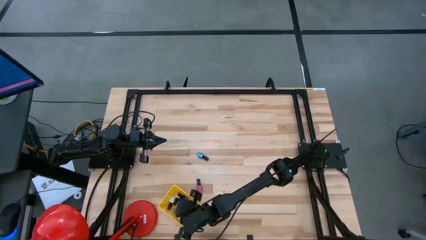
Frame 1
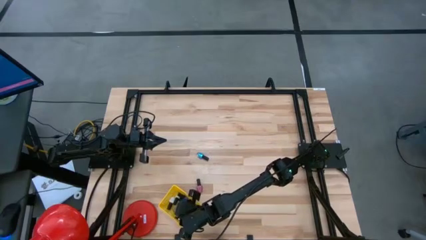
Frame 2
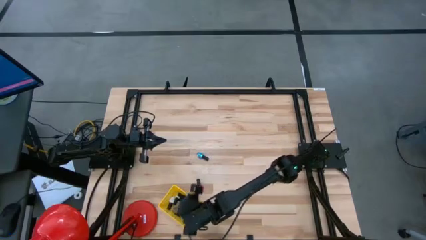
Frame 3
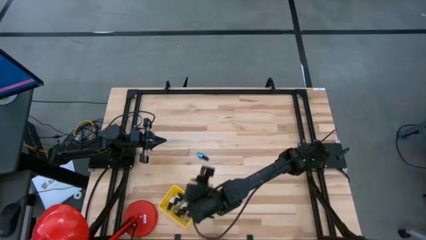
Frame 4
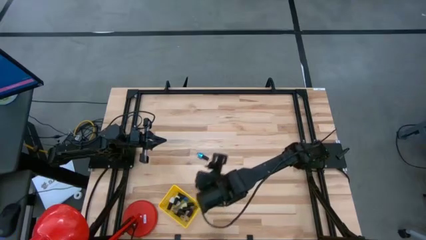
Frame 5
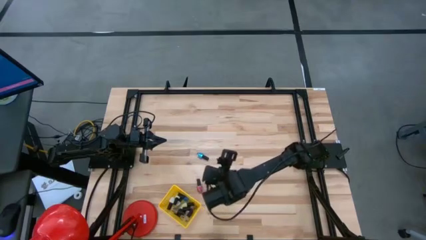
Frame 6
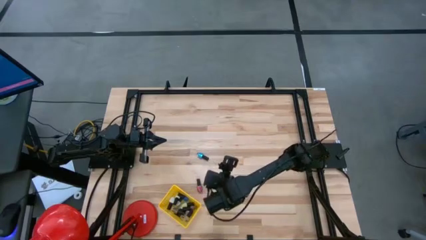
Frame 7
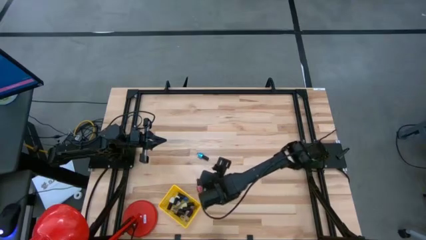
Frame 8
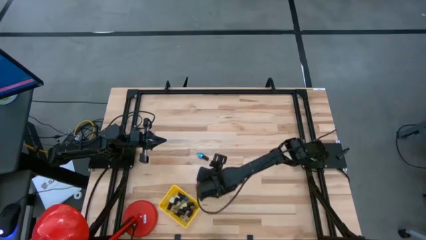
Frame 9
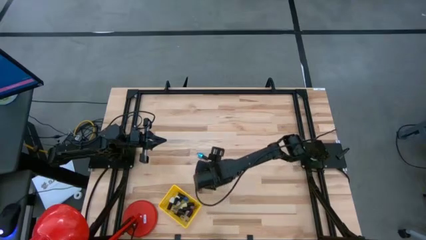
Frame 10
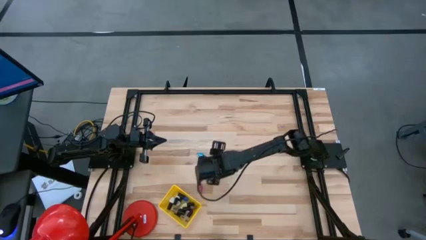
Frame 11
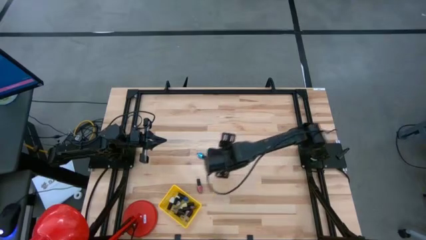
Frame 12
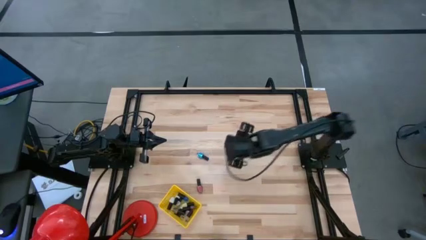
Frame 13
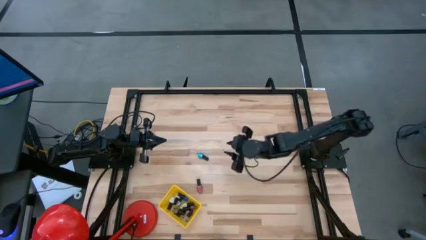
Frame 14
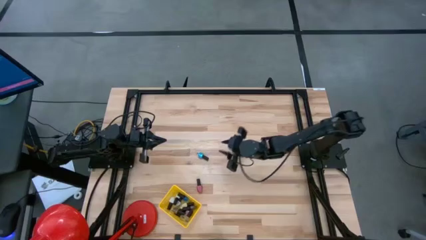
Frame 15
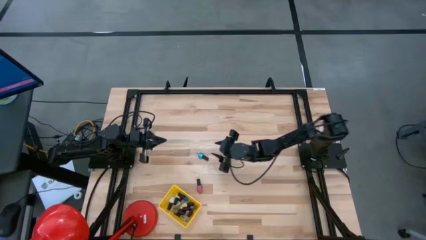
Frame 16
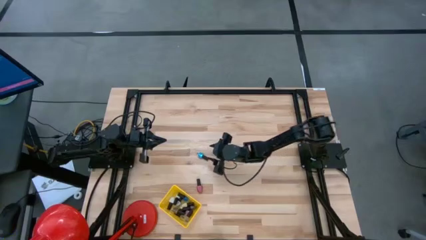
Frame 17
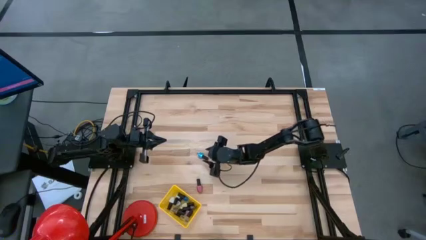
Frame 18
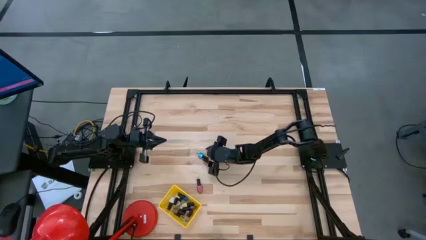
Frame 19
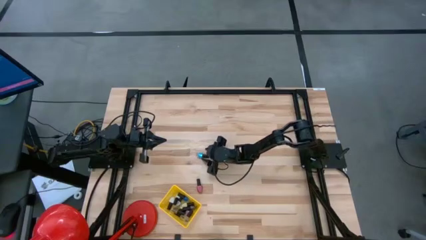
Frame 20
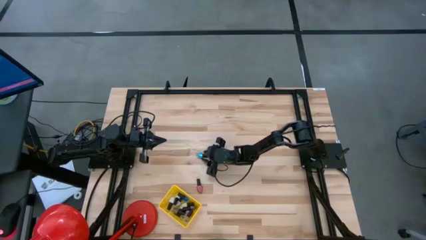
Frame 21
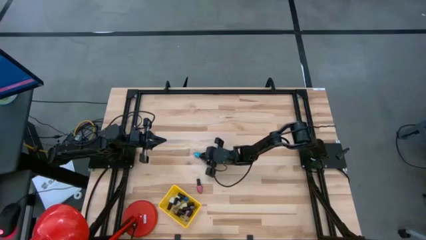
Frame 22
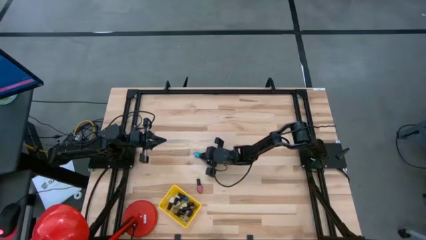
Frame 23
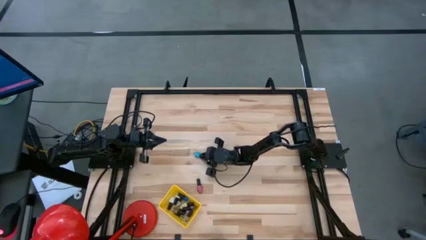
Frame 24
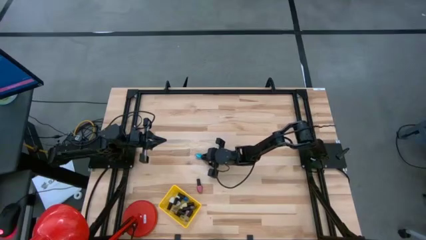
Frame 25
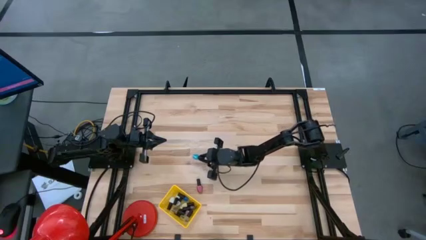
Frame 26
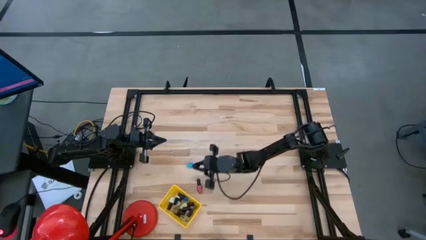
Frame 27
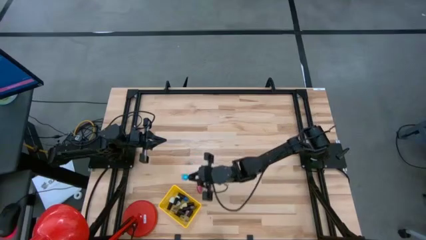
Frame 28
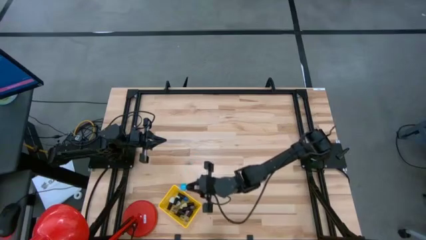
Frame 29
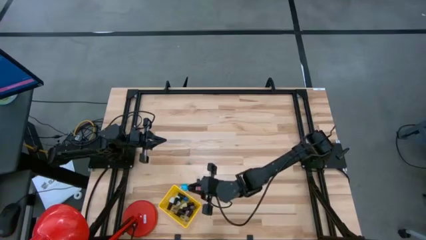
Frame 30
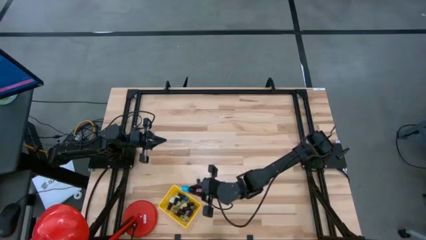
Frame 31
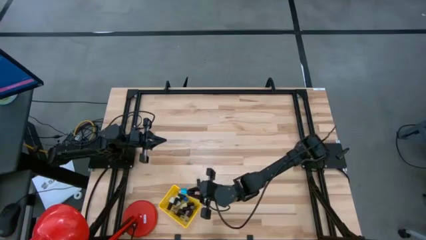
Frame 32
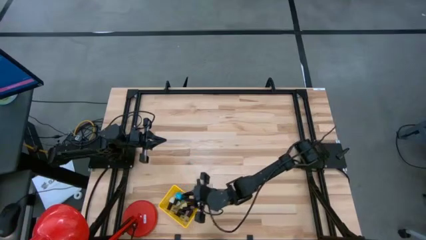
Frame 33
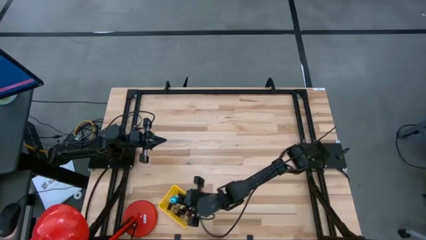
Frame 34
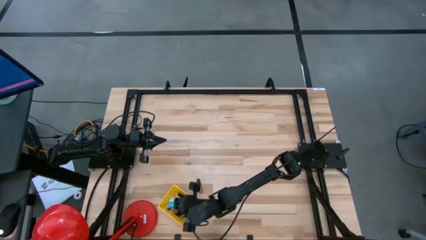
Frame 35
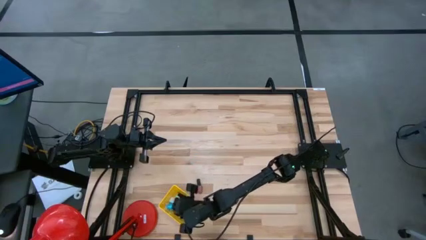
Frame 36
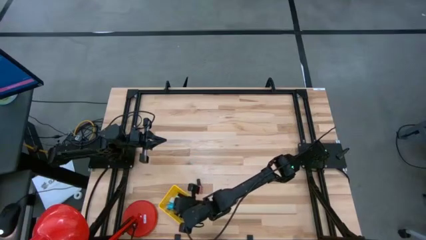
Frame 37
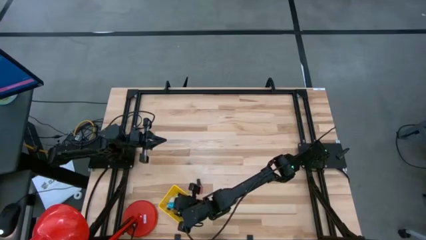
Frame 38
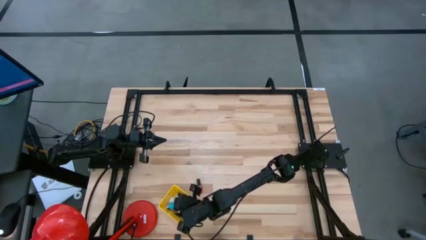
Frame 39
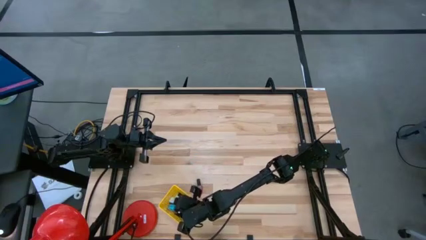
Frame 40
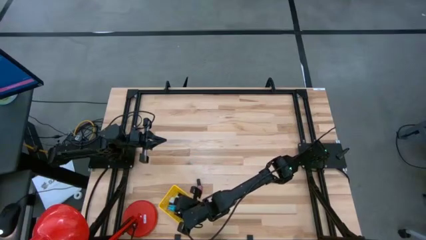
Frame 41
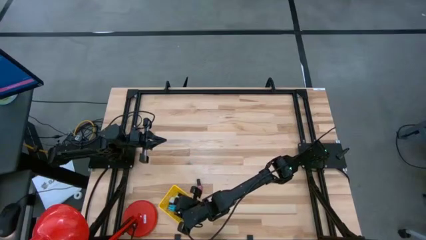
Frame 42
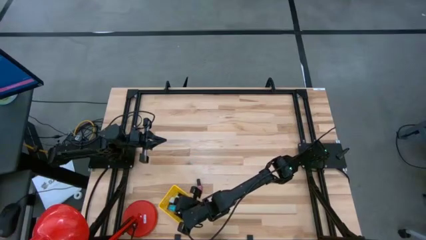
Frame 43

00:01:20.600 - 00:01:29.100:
Task: Pick & Place Nail Polish
Put the light blue nail polish into the yellow basket

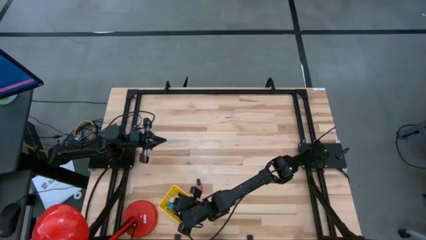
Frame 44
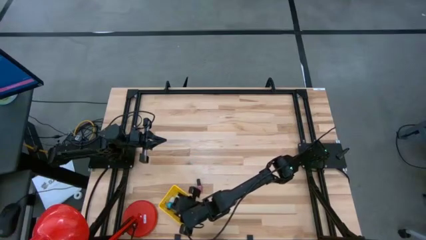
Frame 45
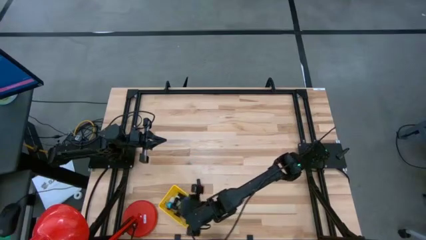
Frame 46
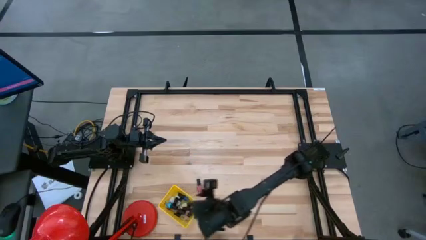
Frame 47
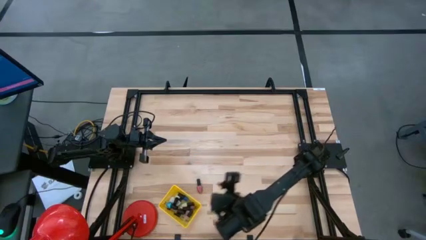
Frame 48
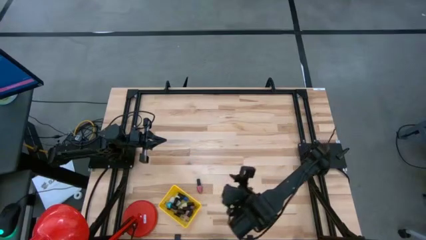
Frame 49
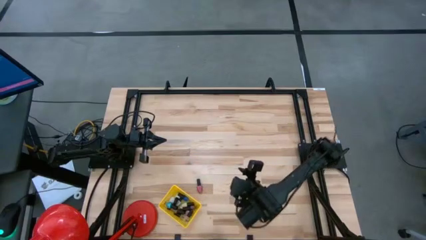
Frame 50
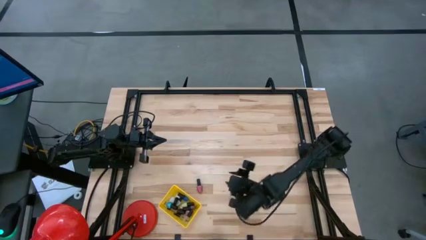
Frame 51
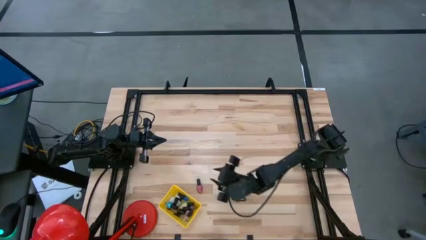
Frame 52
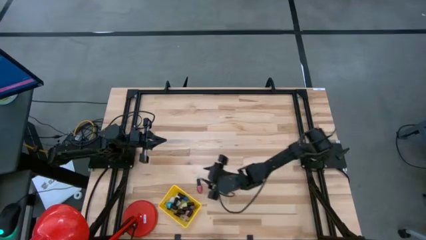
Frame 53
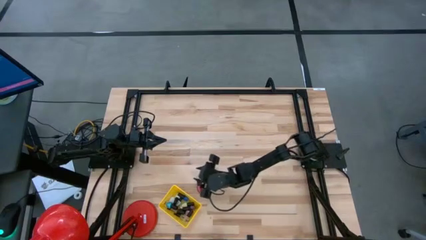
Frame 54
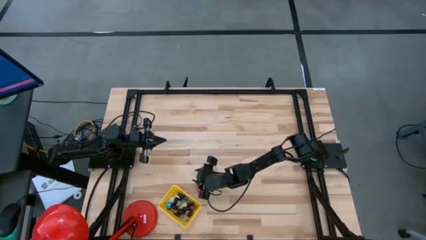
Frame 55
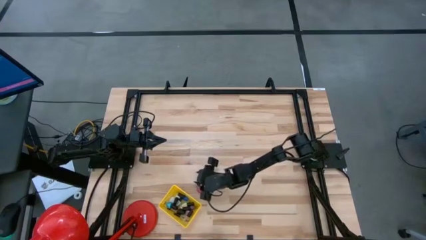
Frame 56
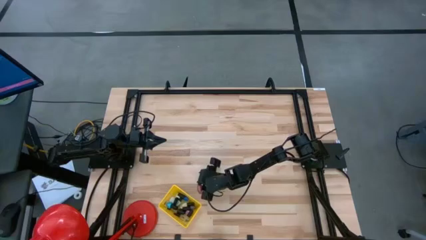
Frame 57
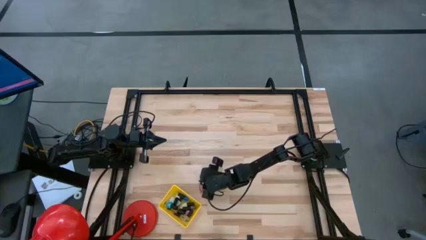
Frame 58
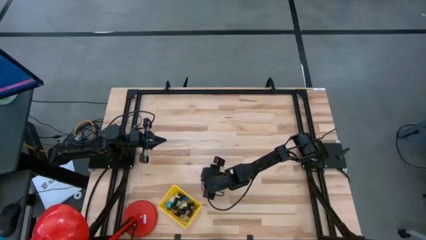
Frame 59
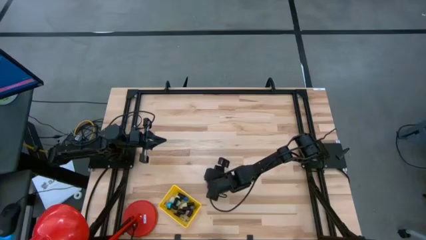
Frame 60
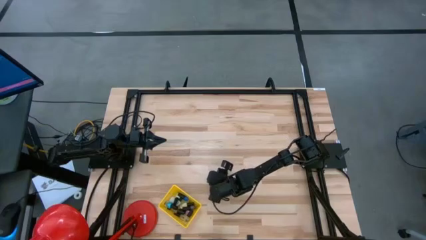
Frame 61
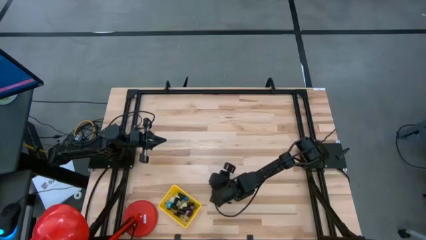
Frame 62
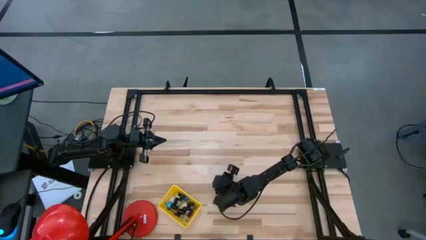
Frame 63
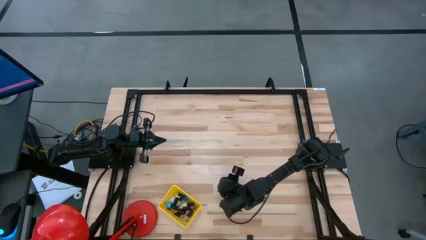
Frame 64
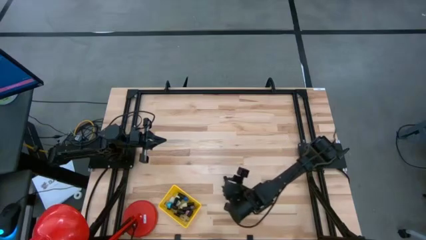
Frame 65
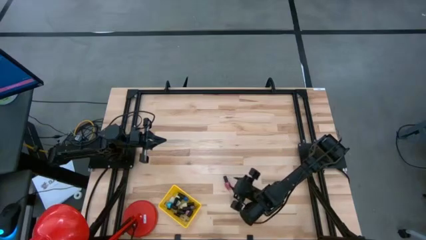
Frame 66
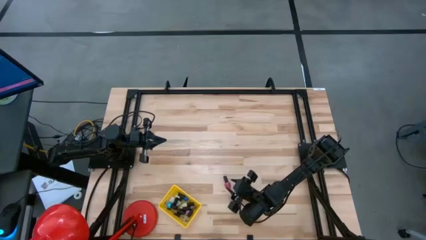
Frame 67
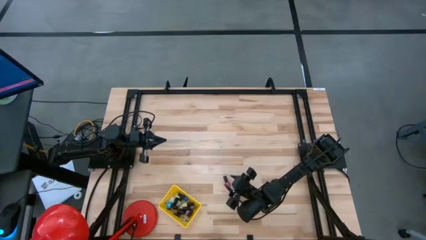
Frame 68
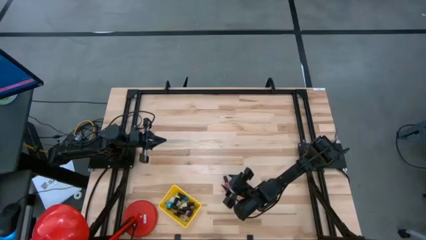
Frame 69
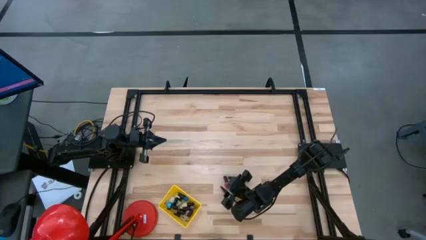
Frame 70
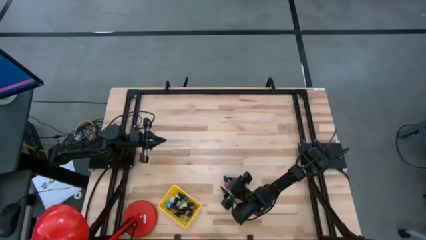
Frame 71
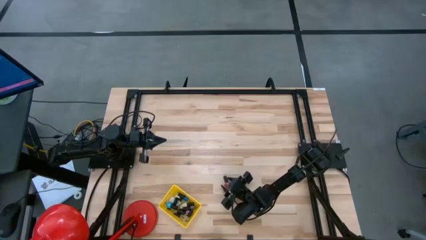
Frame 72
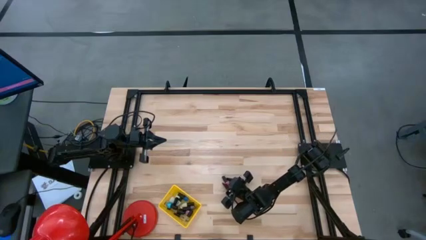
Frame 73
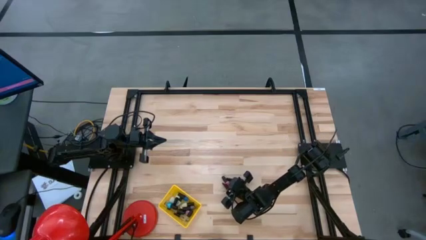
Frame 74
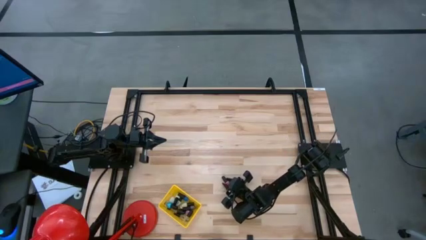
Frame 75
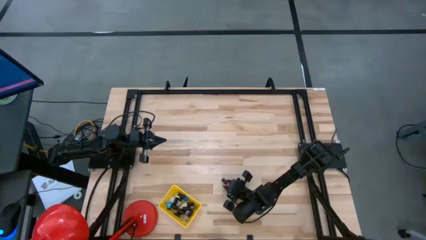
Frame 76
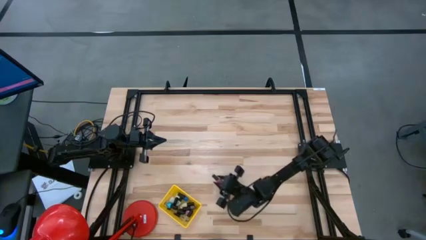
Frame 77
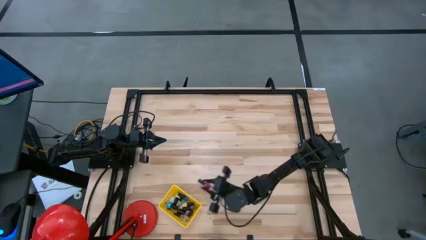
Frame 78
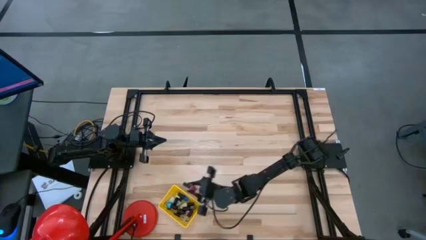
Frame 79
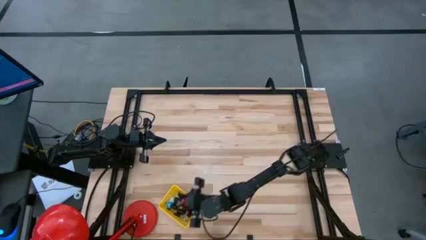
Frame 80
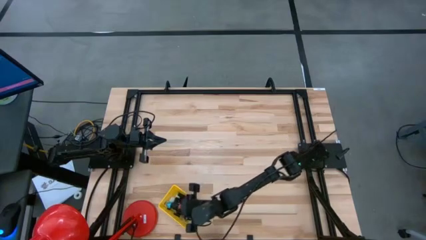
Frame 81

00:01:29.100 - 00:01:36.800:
Put the red nail polish into the yellow basket
